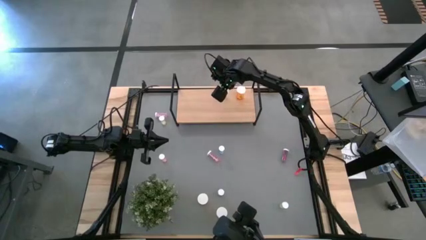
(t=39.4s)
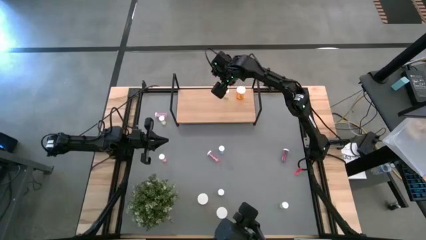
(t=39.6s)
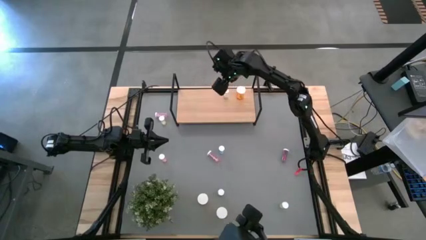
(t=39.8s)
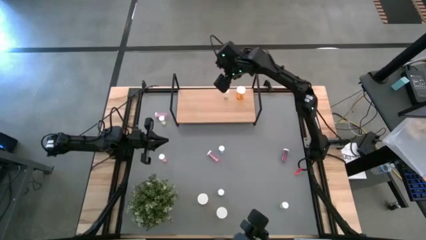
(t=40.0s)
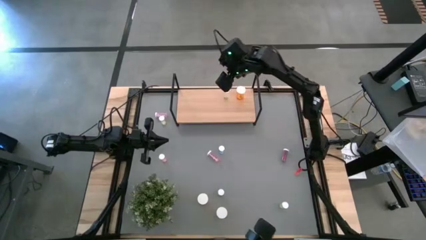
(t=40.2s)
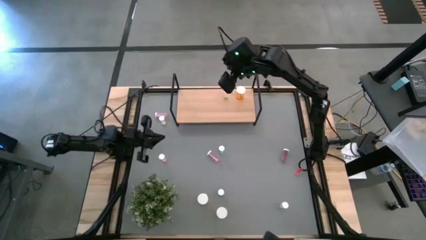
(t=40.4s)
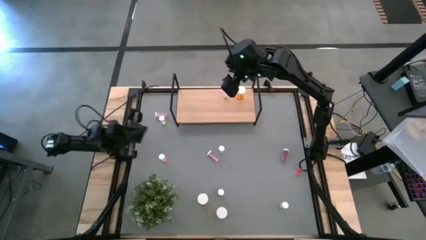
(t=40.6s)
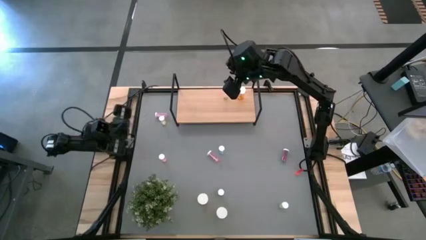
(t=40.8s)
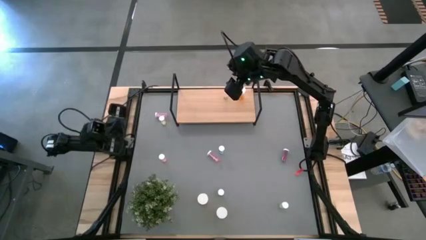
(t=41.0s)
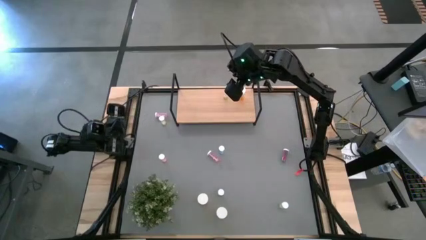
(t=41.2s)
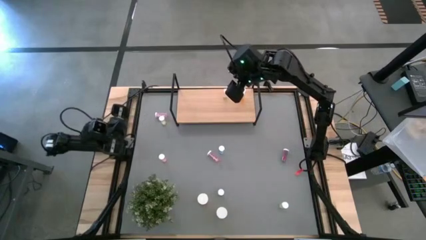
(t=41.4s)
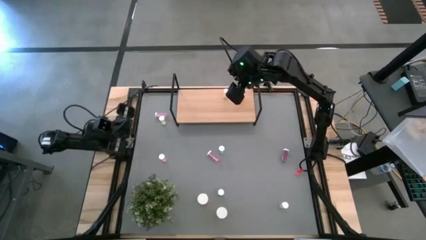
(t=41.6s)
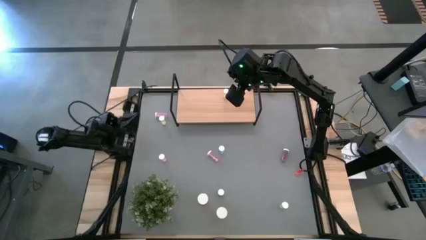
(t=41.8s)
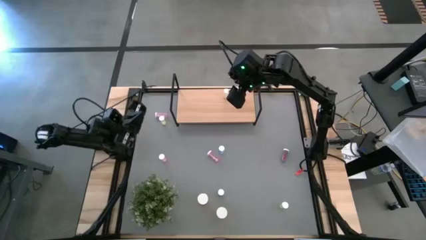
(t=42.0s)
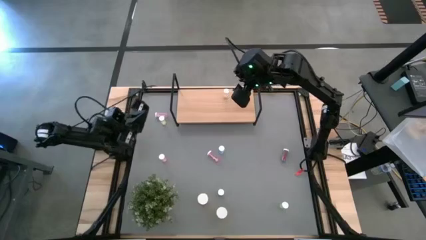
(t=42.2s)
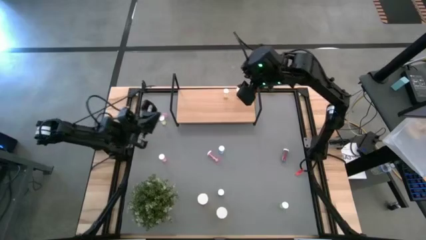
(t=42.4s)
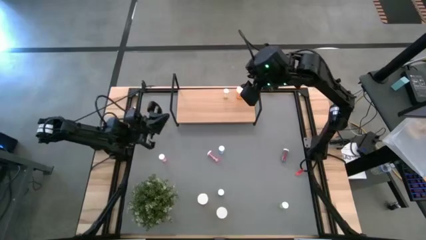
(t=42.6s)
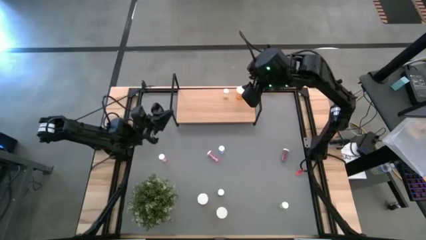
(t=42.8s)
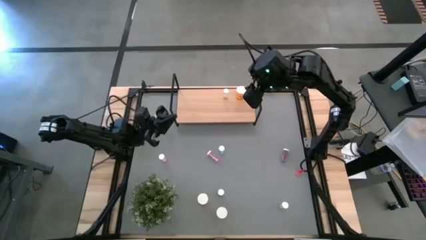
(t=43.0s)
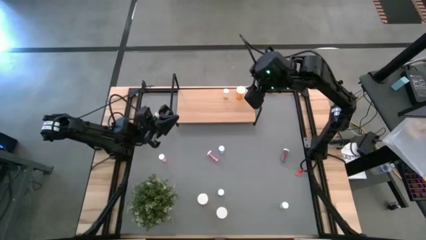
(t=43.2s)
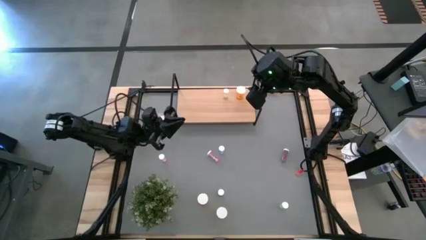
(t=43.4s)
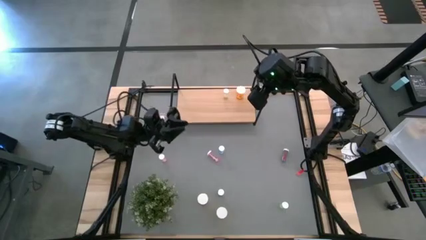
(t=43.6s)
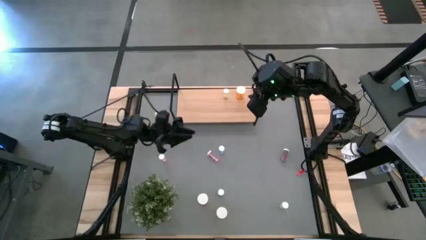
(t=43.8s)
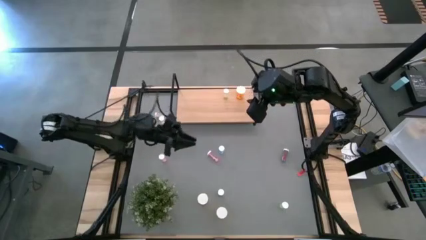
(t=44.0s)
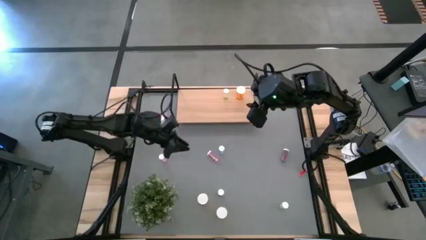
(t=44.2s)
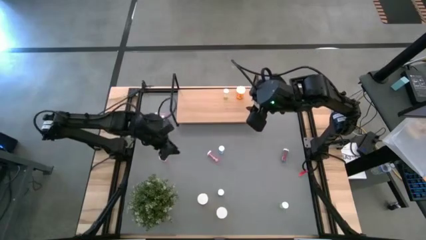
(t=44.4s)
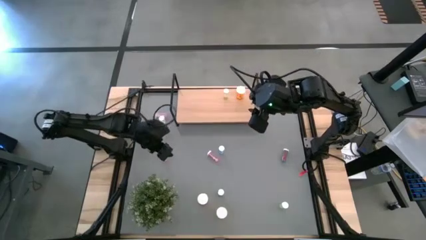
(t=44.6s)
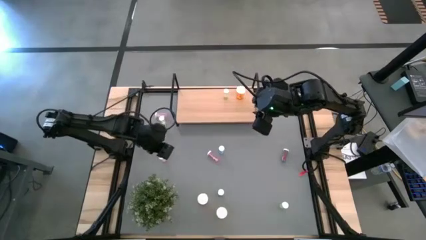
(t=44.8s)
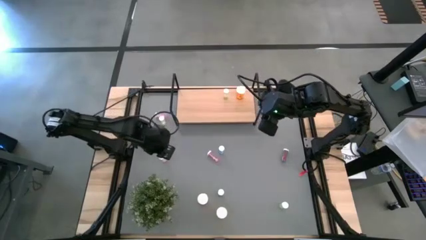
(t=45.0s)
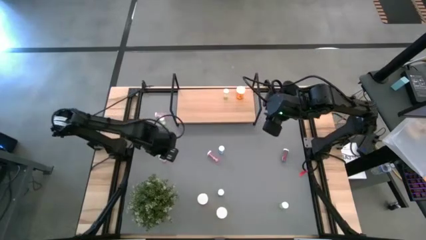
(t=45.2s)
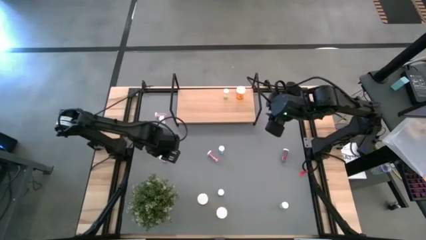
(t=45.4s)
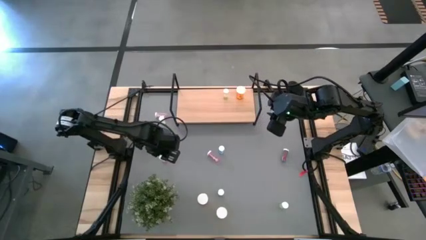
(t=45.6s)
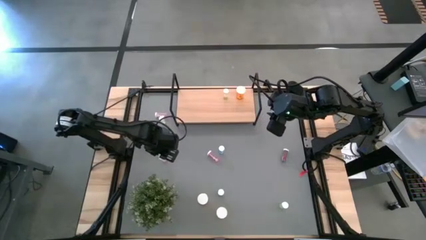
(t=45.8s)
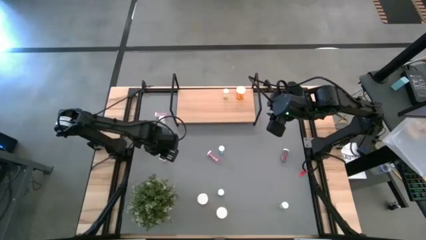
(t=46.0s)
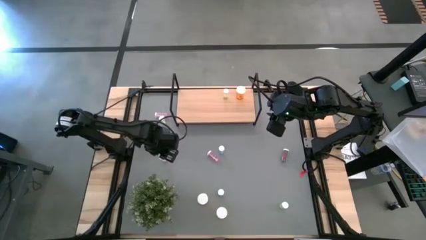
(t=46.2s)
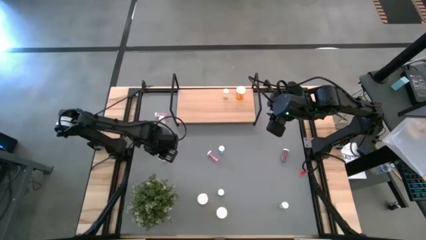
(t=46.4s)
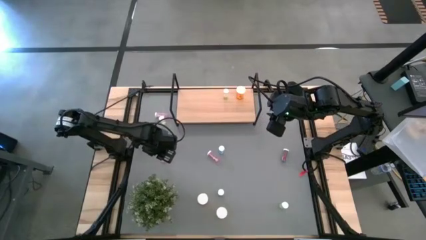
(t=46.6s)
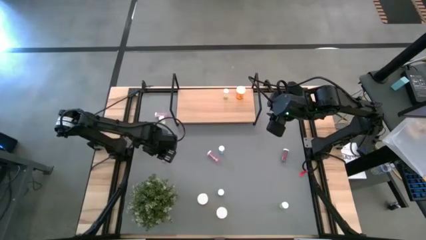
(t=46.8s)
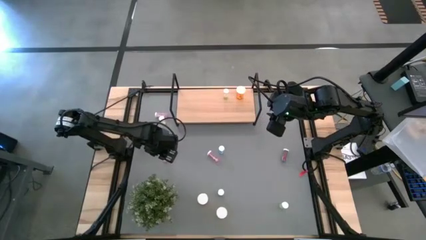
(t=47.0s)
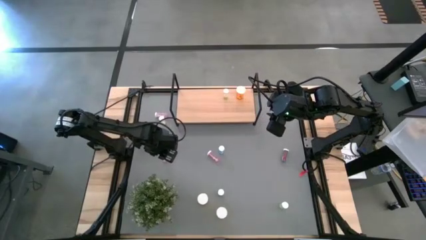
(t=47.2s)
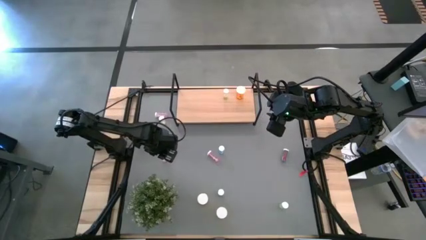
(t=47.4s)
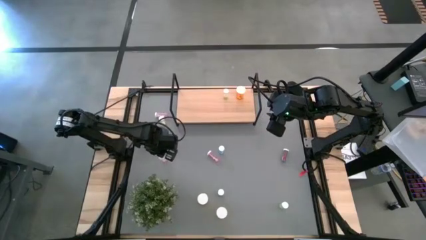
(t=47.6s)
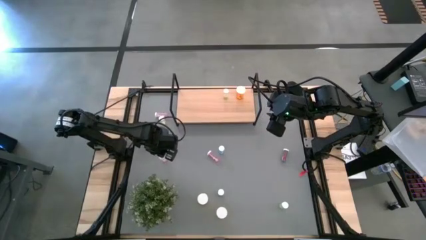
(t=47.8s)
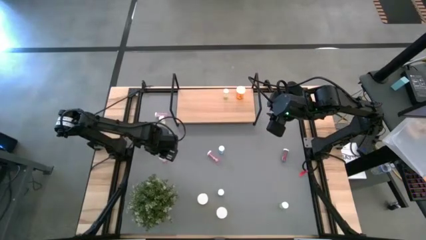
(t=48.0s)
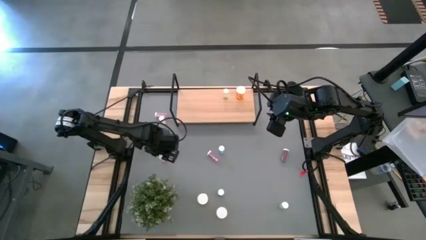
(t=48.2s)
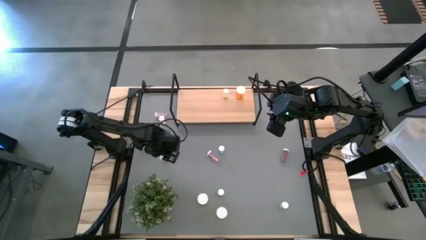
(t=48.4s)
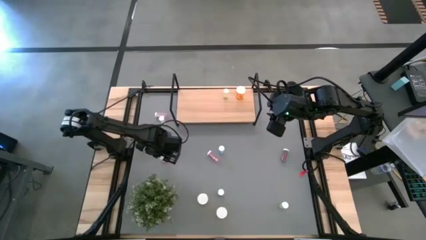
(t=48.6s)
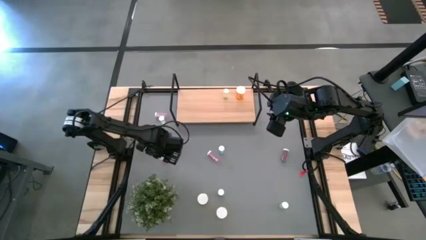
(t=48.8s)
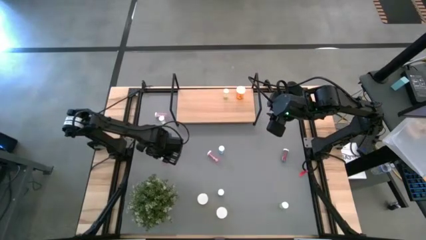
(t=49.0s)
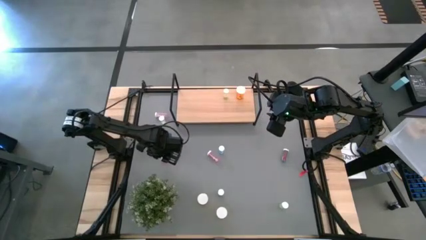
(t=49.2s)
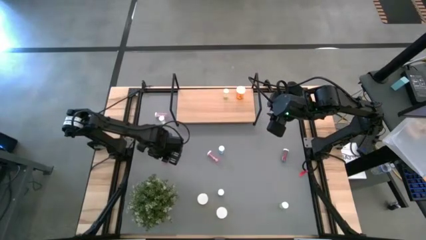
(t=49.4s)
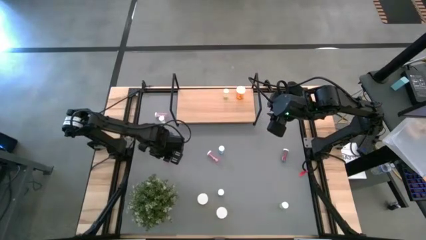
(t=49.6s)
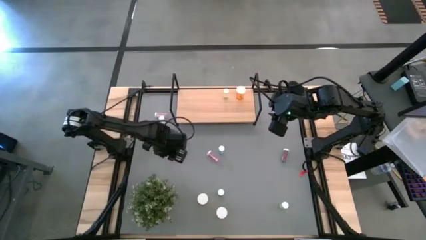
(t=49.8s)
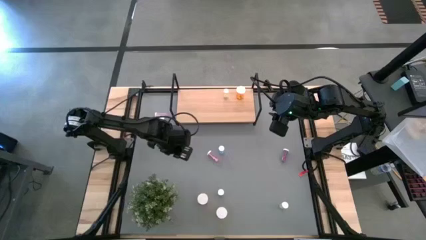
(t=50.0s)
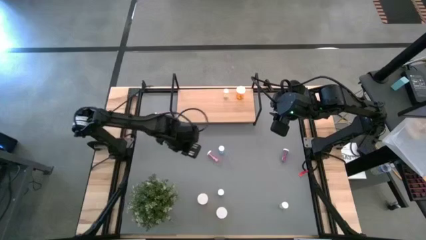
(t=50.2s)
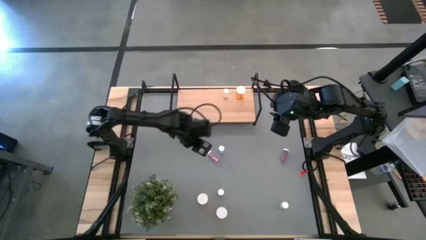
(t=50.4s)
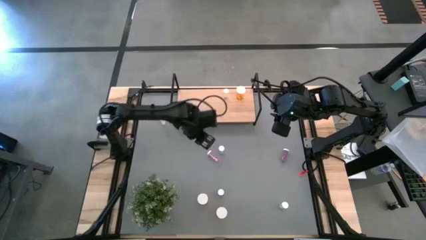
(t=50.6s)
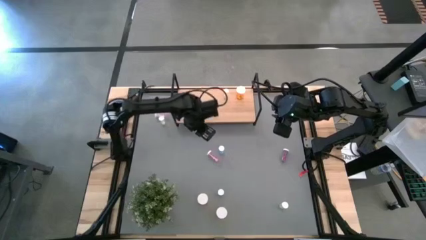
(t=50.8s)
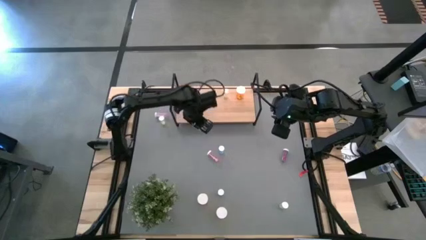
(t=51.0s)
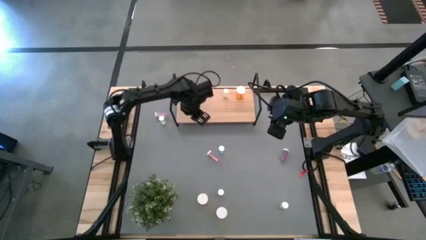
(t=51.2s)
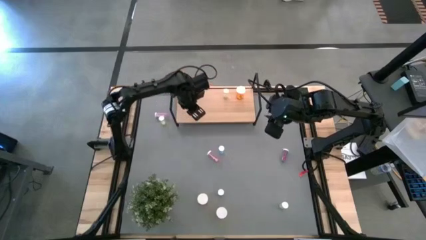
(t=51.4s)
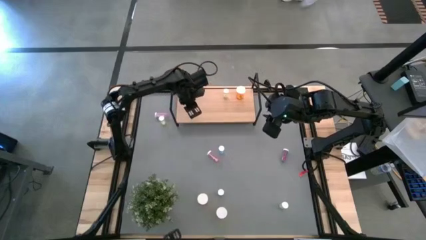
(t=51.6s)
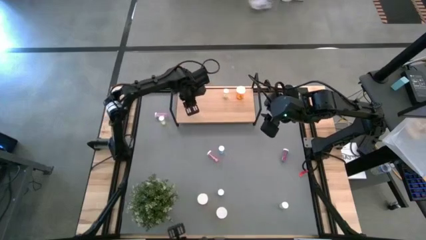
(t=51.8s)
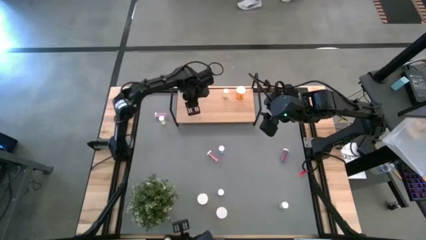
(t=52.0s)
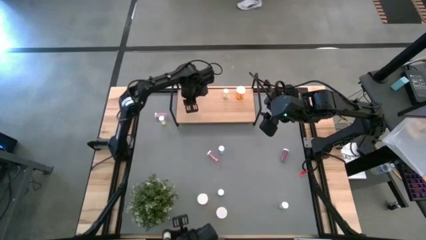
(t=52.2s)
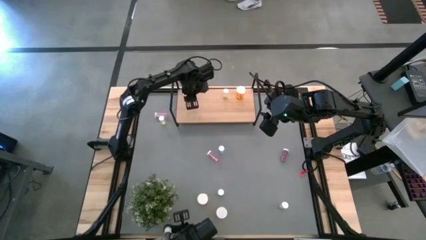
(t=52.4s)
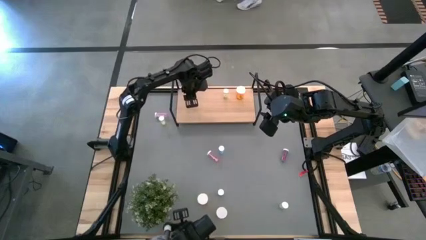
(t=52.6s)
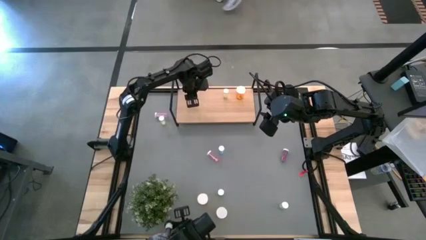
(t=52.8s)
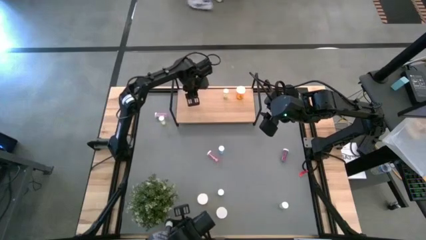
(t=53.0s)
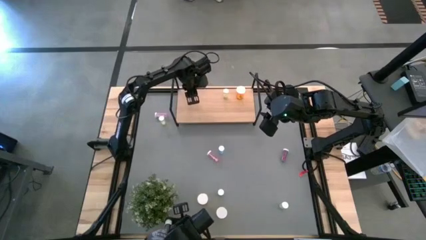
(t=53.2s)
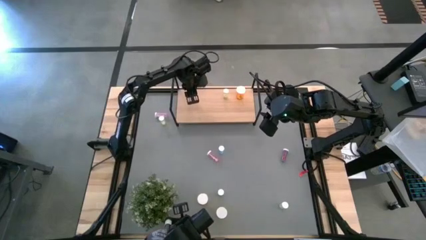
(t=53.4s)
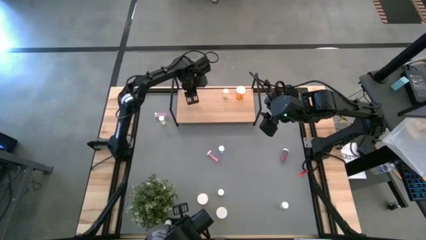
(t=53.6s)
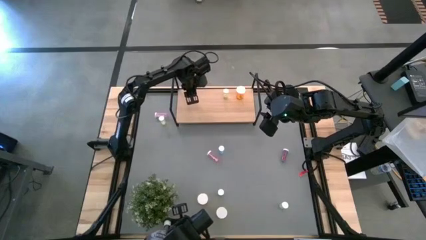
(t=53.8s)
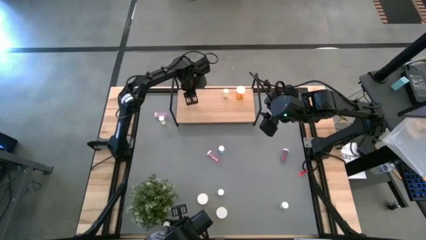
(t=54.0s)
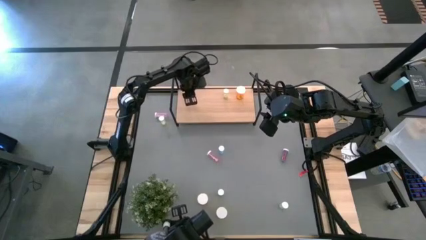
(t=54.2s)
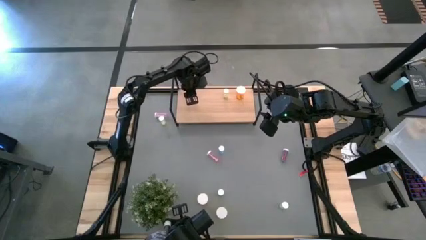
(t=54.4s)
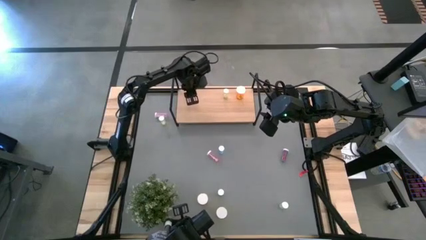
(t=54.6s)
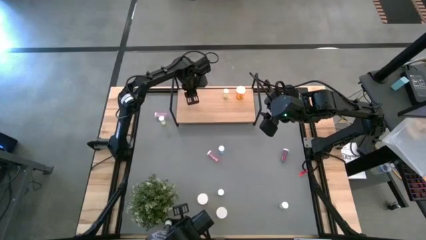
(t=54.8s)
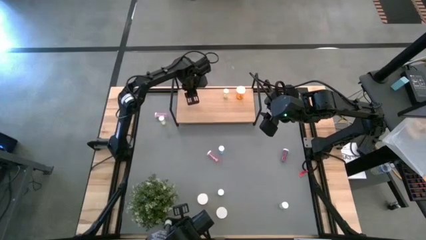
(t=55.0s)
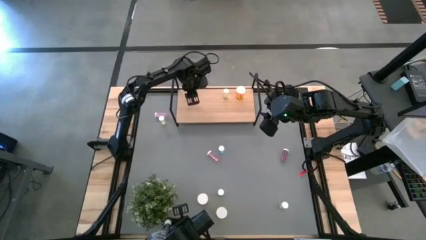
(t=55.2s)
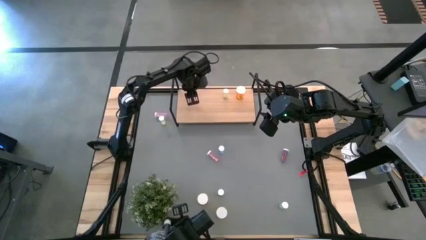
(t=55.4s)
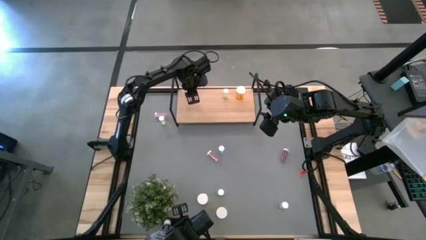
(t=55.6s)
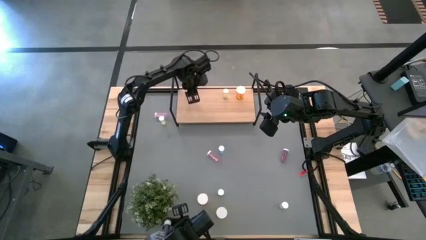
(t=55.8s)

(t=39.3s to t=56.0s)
Task: Pick and place medicine bottles onto shelf by color
Put the middle left pink pill bottle on the shelf
